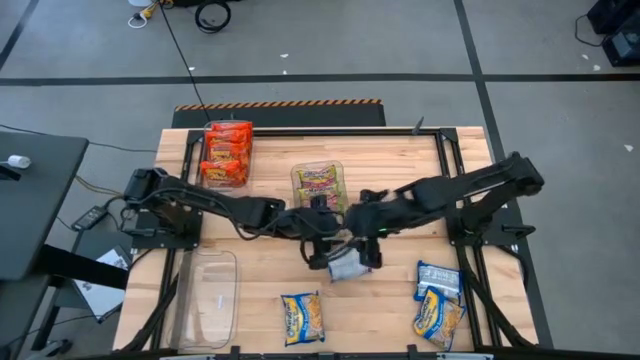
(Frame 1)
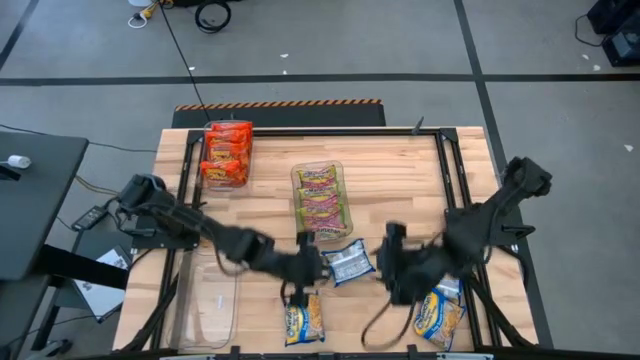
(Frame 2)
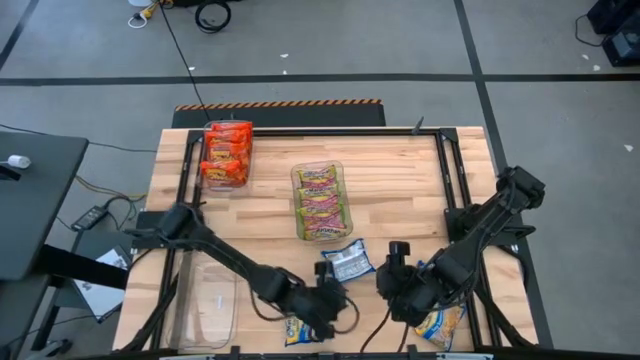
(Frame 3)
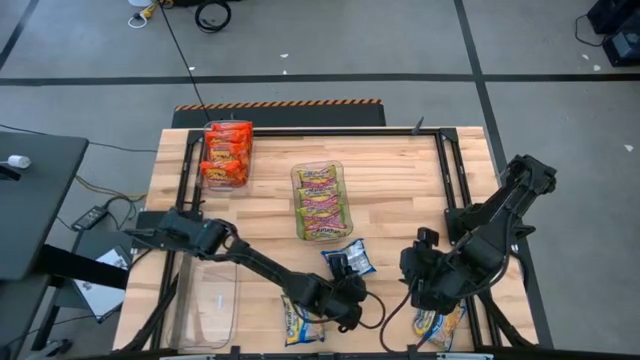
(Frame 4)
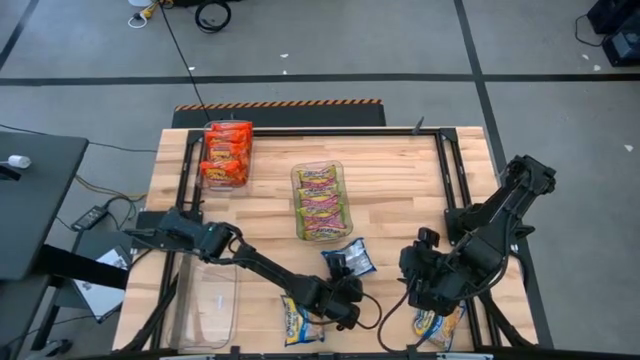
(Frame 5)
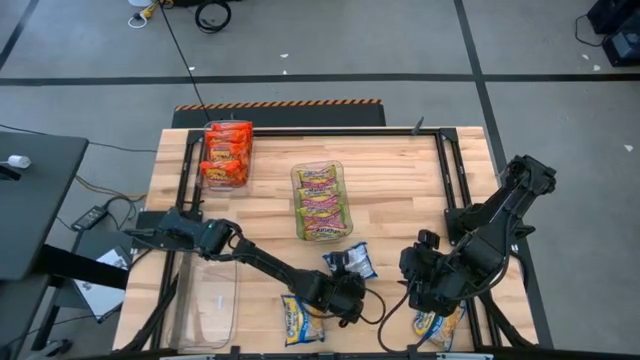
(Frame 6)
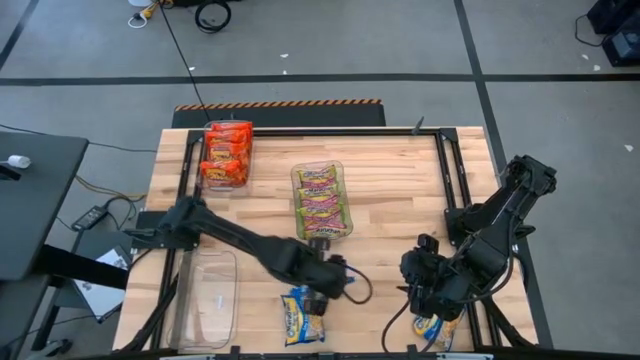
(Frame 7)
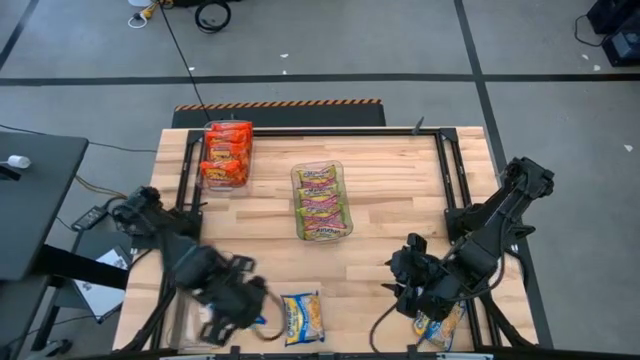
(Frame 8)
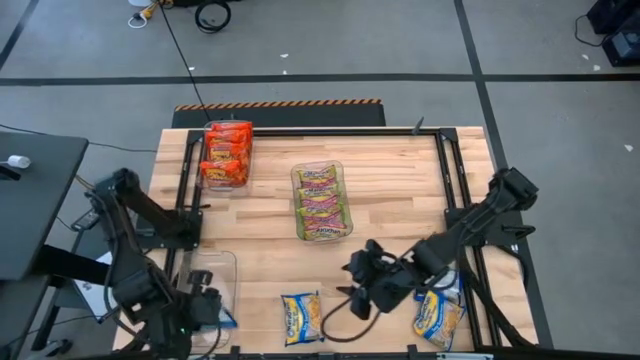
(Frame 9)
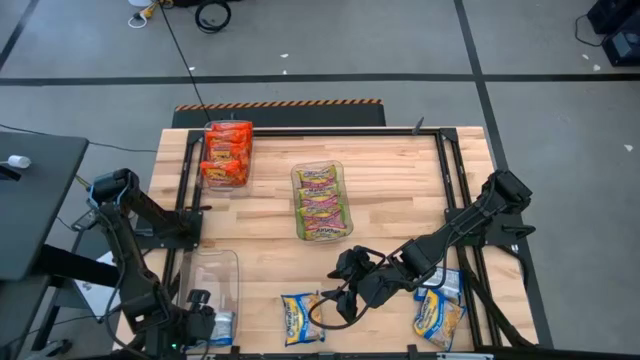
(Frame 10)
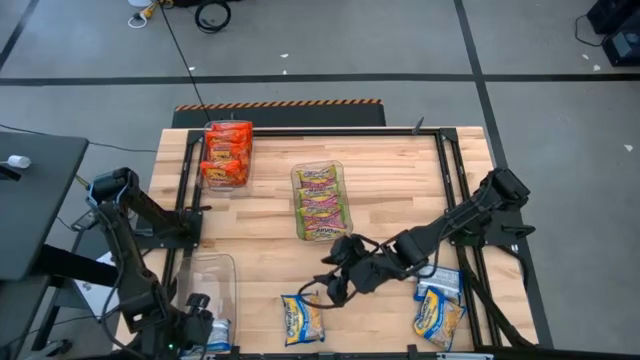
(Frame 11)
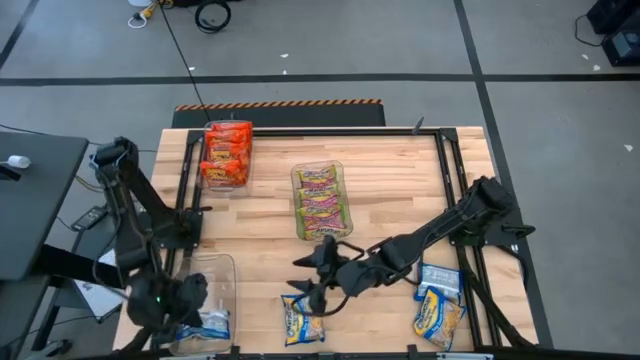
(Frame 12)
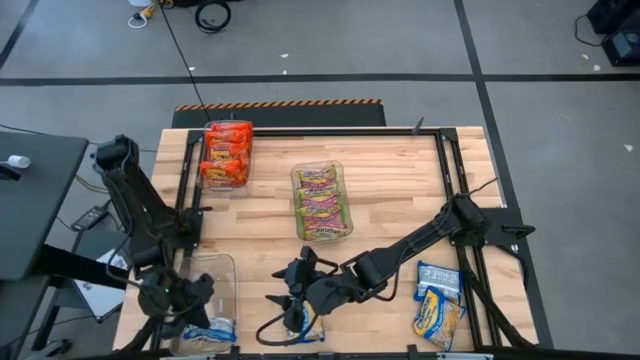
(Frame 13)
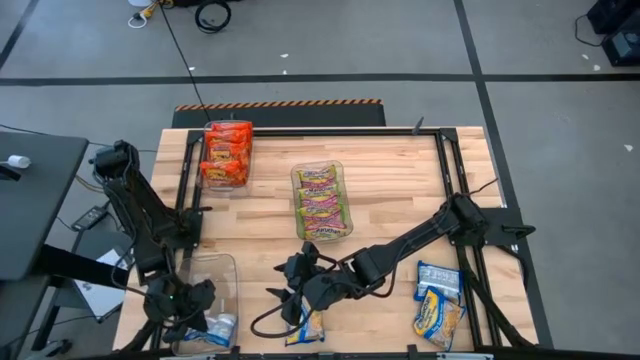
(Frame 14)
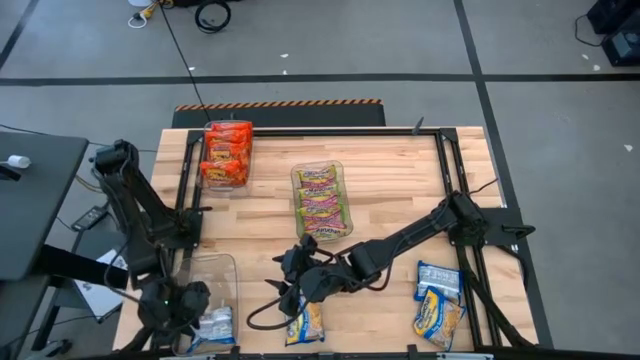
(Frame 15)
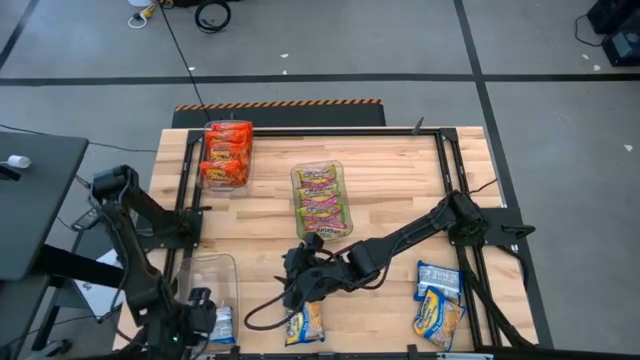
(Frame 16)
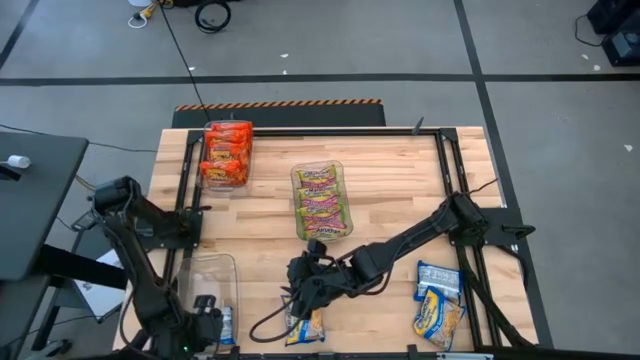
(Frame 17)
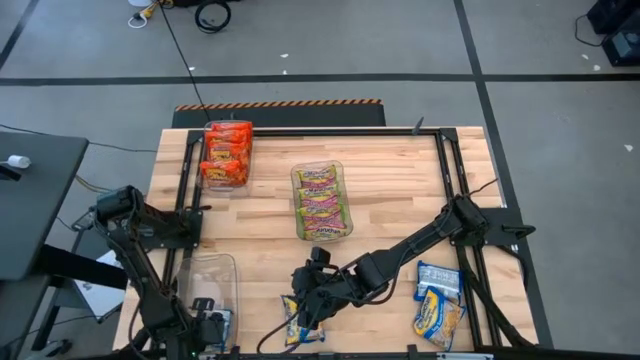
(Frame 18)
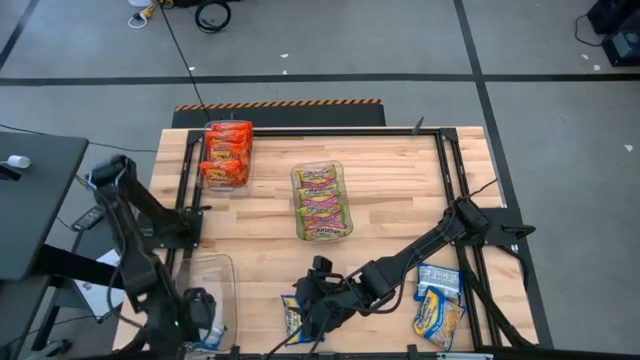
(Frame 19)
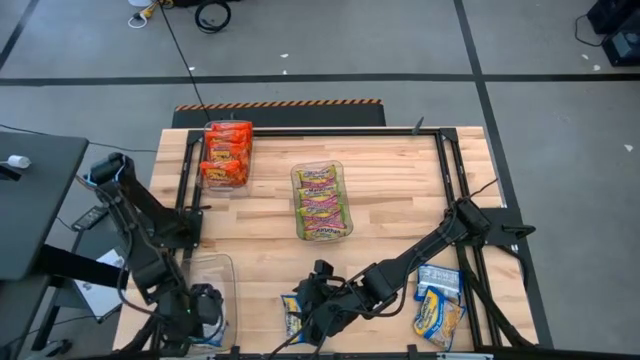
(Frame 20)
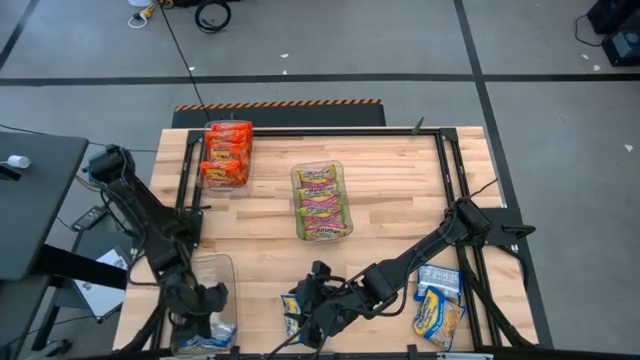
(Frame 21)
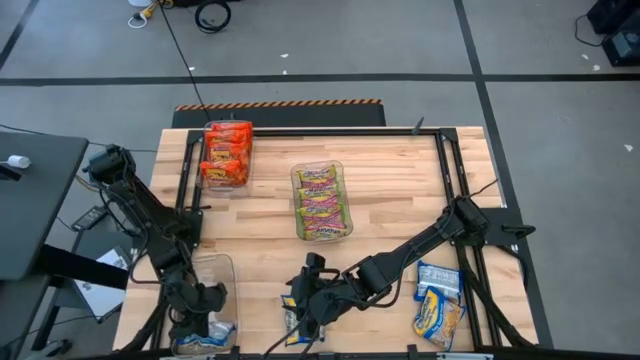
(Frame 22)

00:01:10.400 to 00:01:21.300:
Task: Sort Maruchan noodles
Put the top left blue noodle pack into the bottom transparent bin

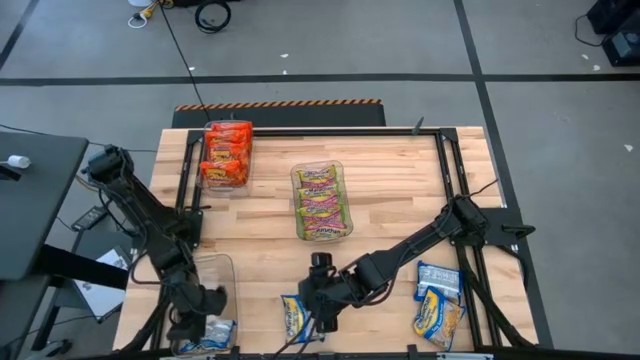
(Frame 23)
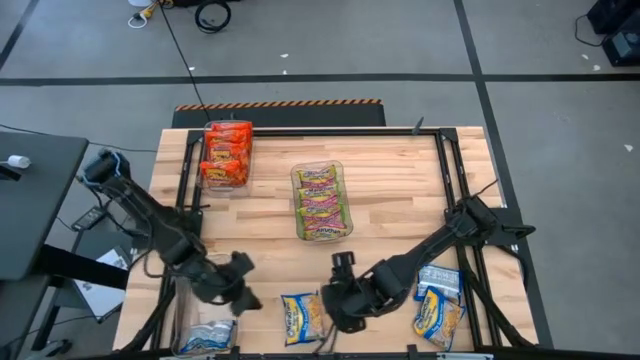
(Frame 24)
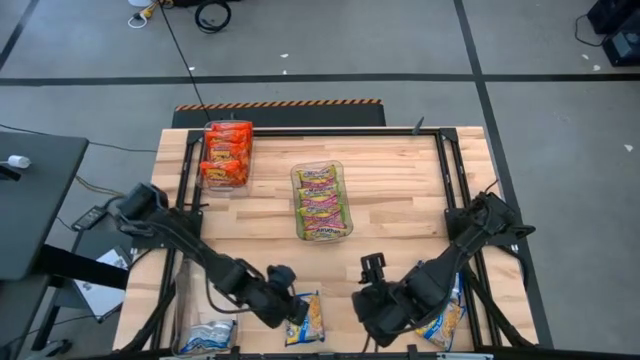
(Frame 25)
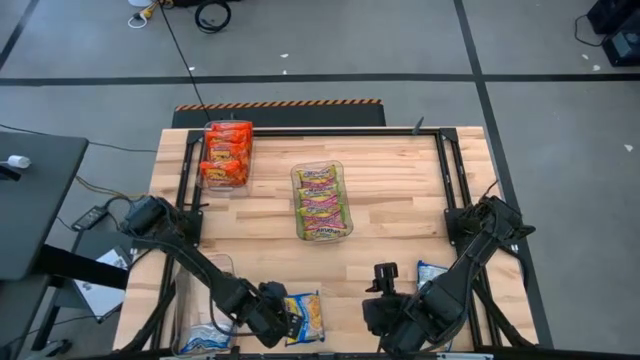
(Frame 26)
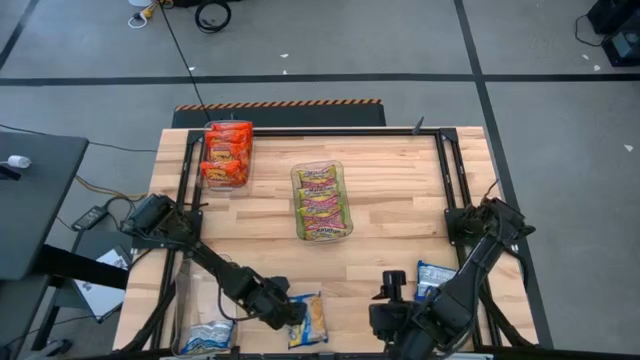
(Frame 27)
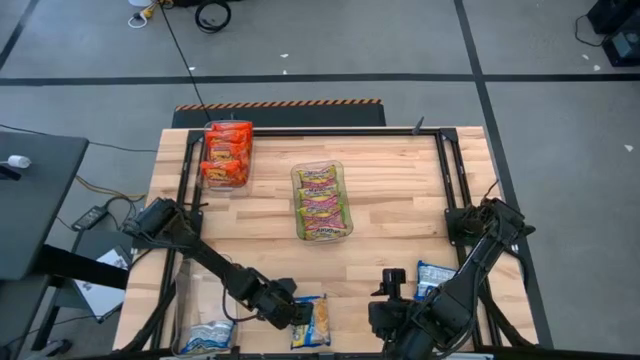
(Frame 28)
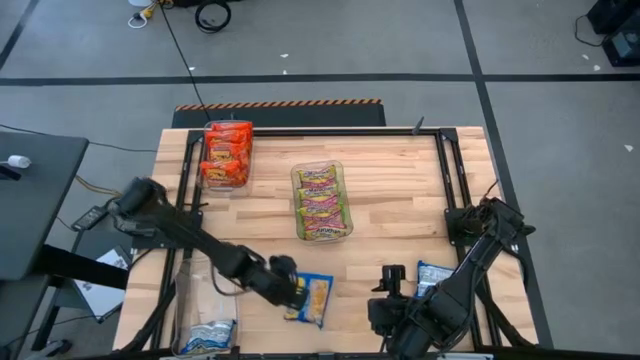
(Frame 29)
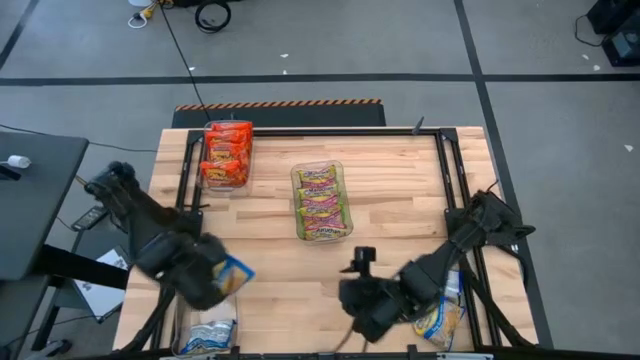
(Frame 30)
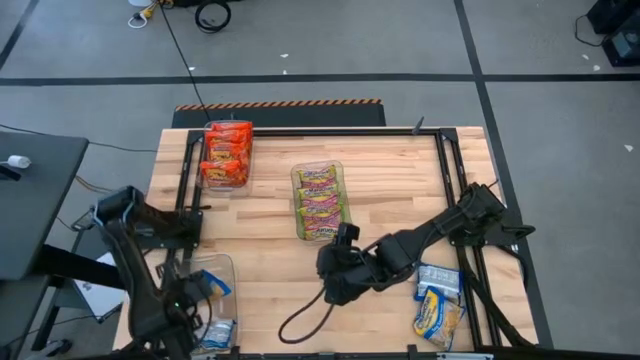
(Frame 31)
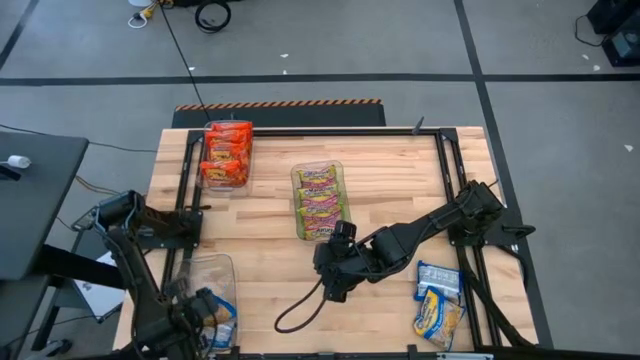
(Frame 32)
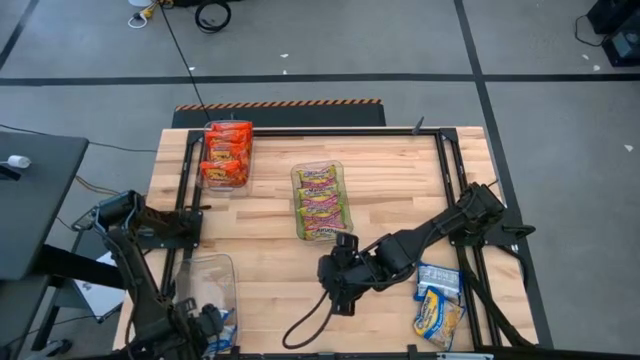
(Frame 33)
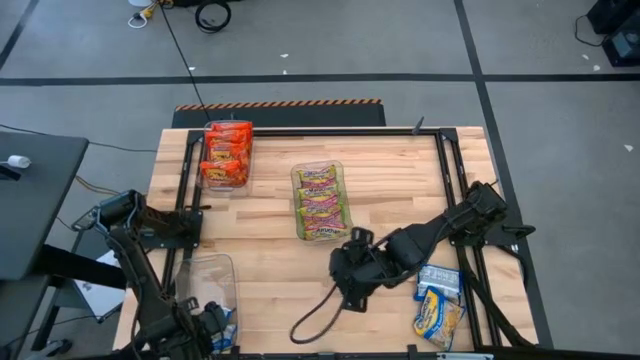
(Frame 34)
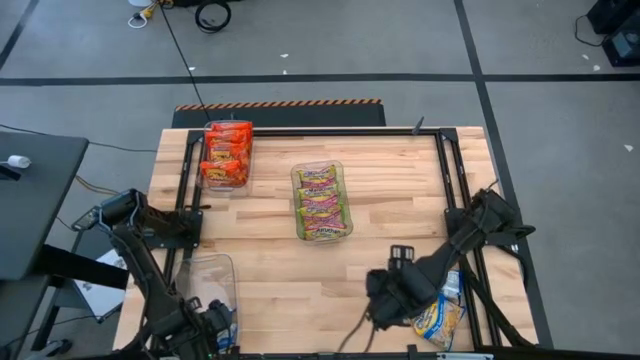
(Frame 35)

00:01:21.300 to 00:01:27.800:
Put the bottom left blue noodle pack into the bottom transparent bin

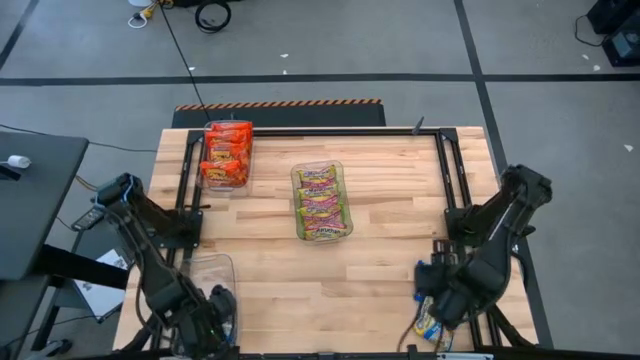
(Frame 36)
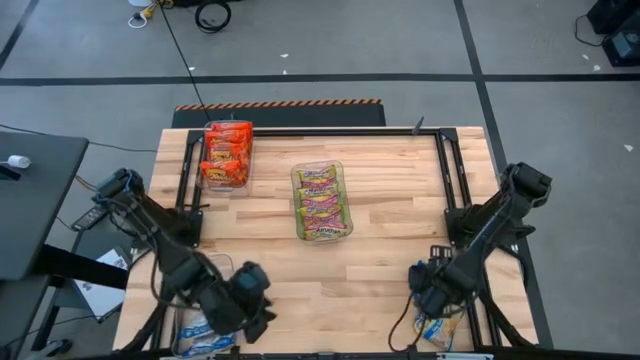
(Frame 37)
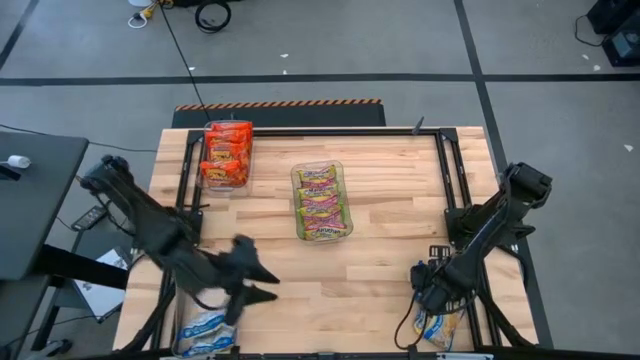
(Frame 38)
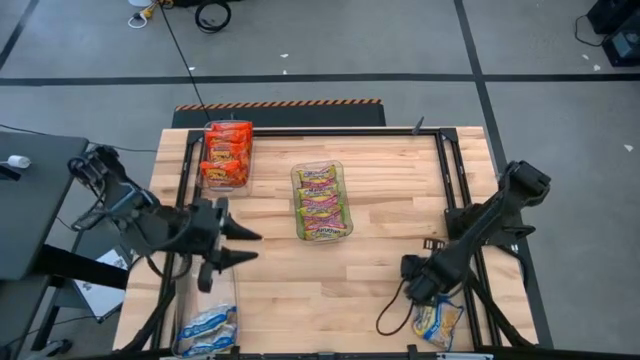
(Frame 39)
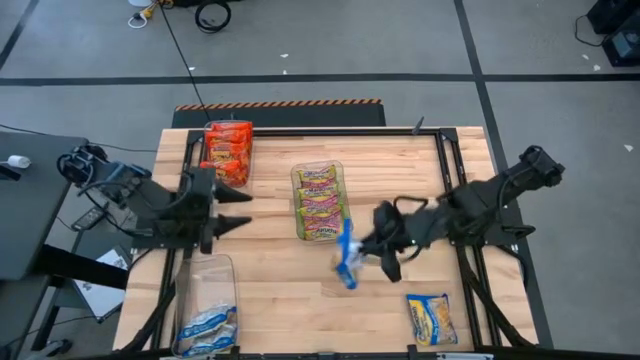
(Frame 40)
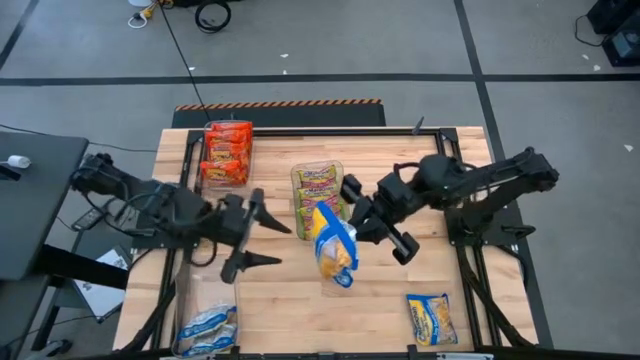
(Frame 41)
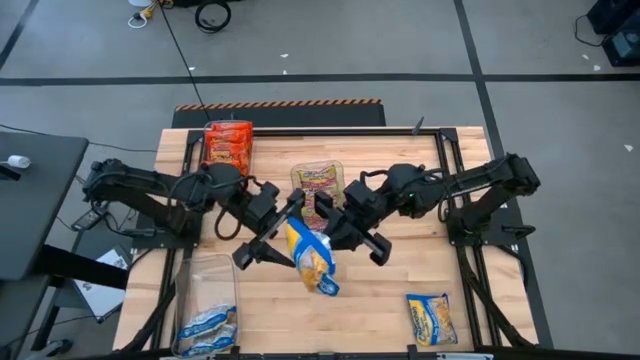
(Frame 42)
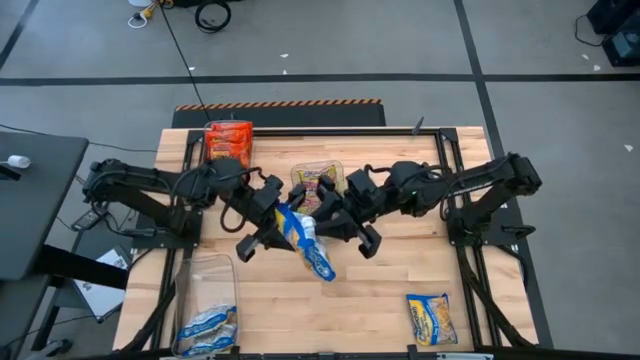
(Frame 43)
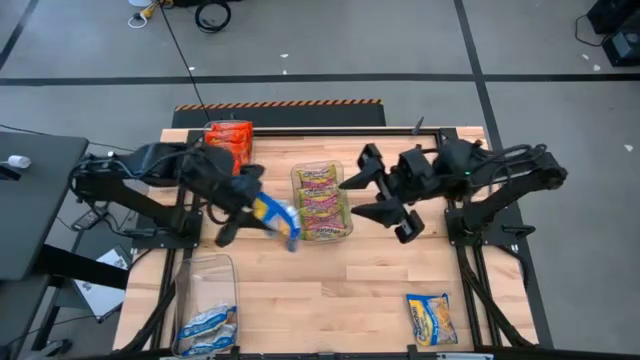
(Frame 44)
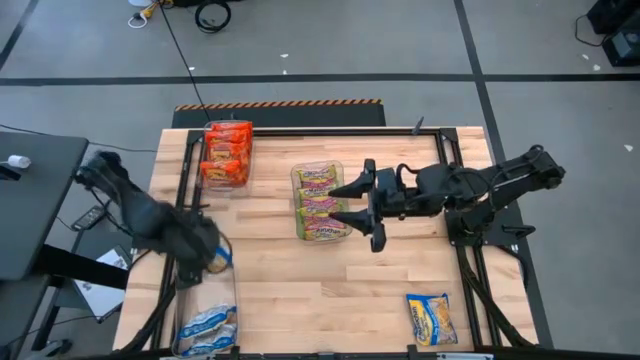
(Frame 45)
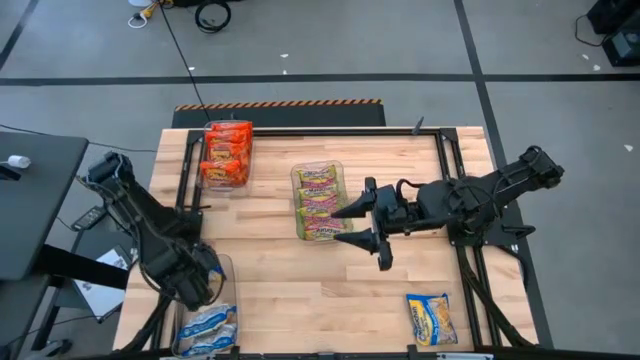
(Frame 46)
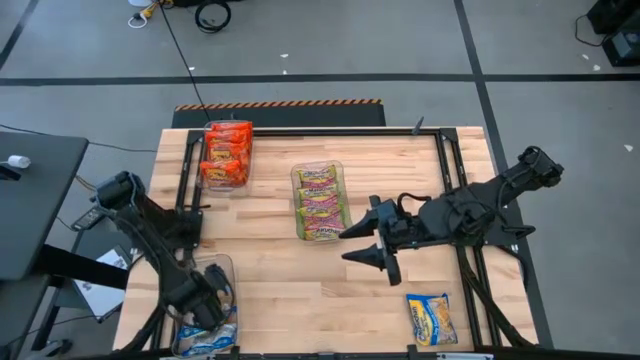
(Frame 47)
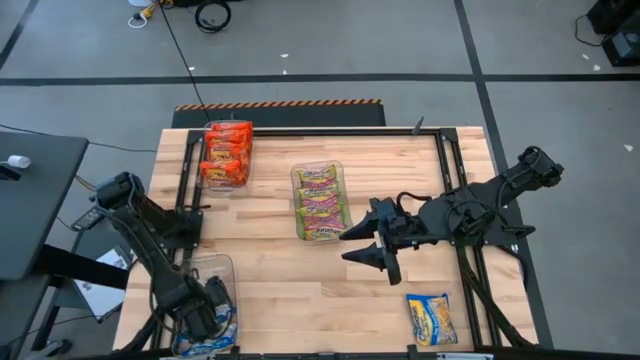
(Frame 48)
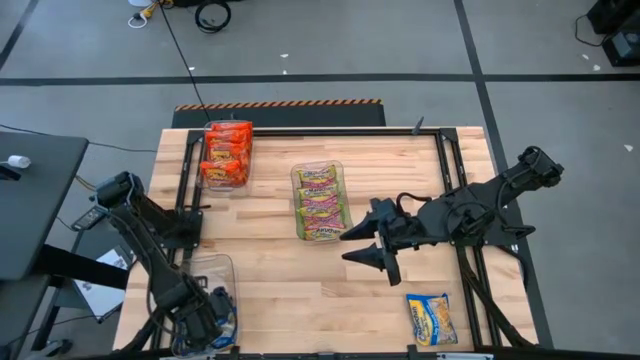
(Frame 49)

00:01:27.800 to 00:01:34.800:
Put the top blue noodle pack into the bottom transparent bin
